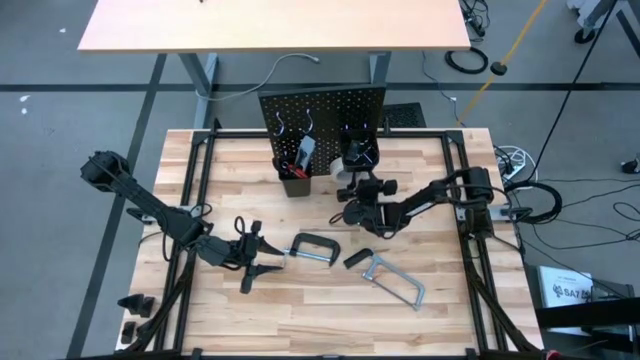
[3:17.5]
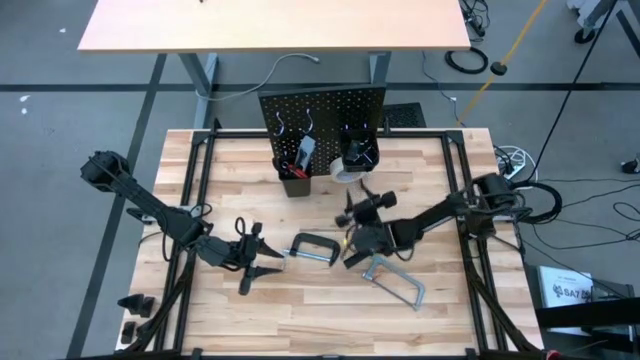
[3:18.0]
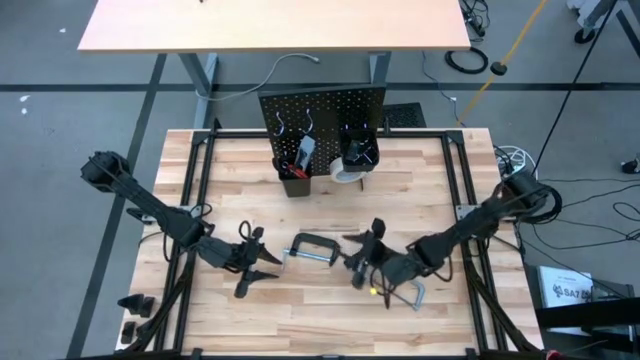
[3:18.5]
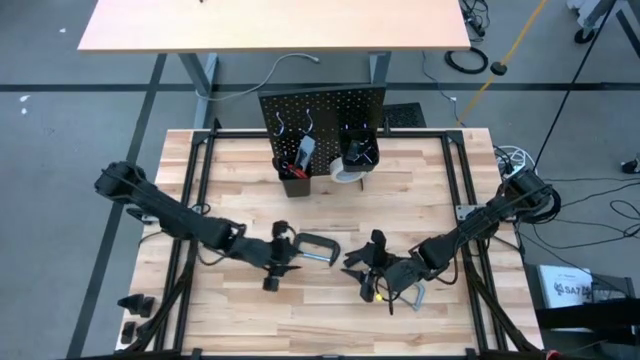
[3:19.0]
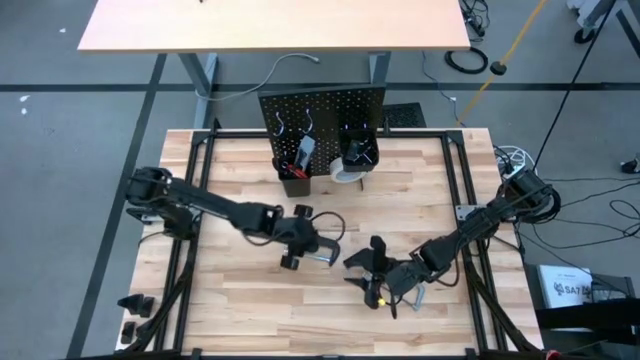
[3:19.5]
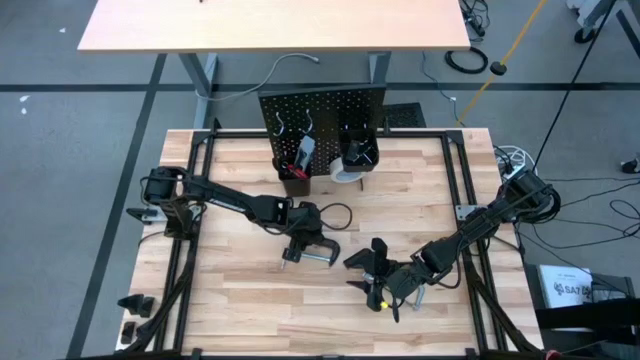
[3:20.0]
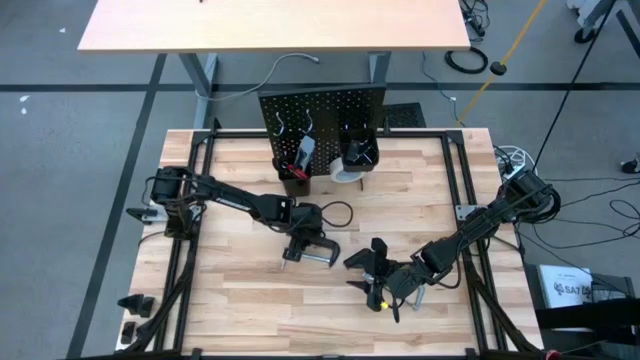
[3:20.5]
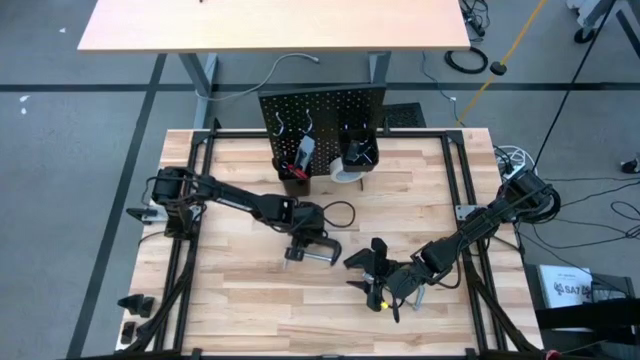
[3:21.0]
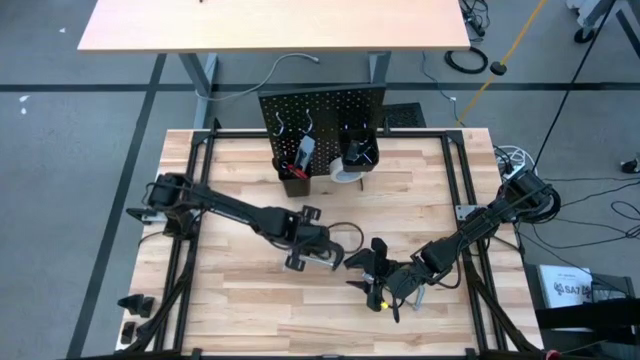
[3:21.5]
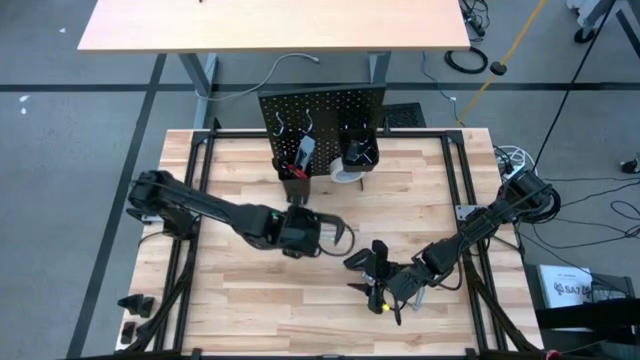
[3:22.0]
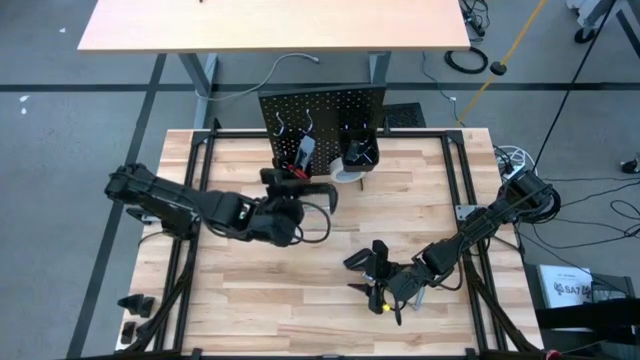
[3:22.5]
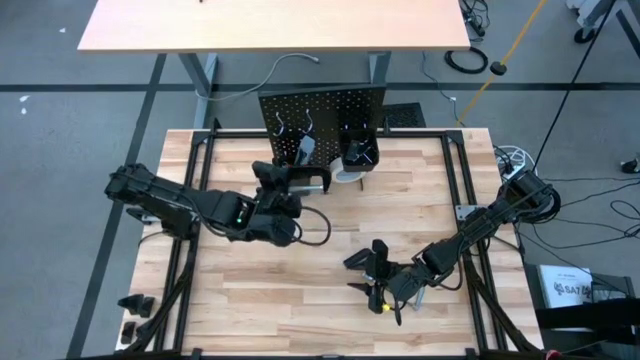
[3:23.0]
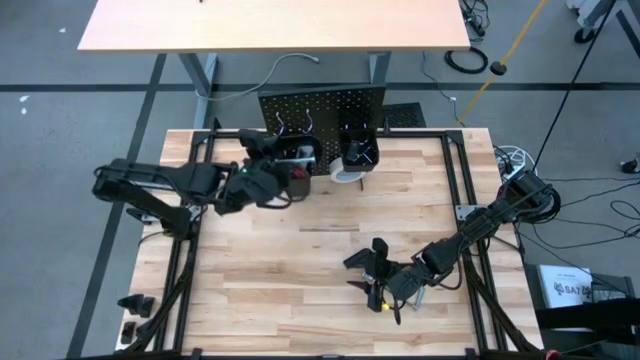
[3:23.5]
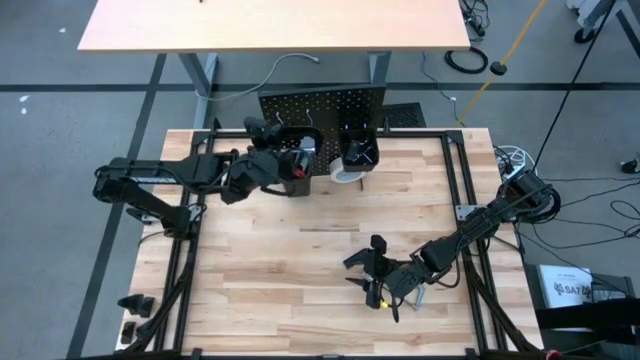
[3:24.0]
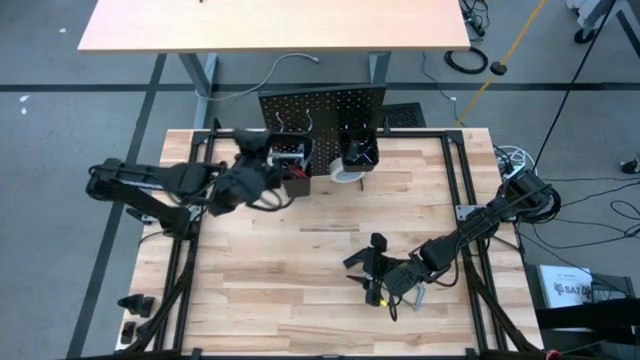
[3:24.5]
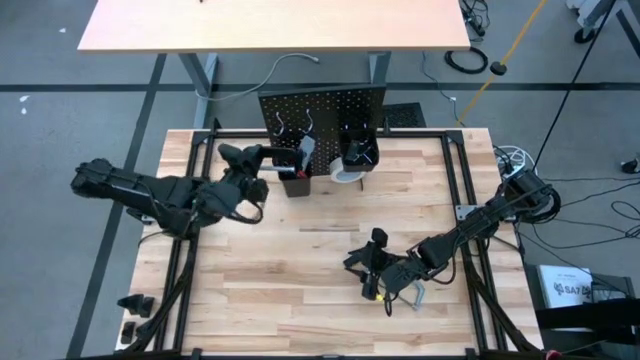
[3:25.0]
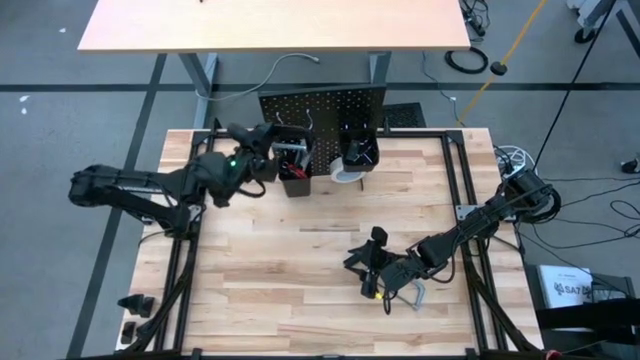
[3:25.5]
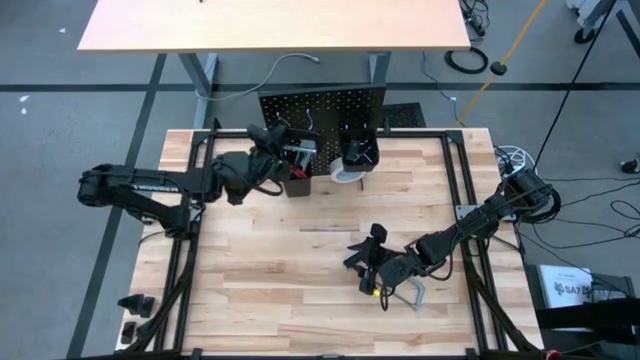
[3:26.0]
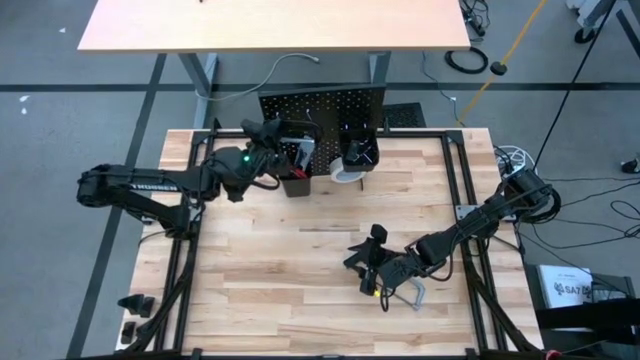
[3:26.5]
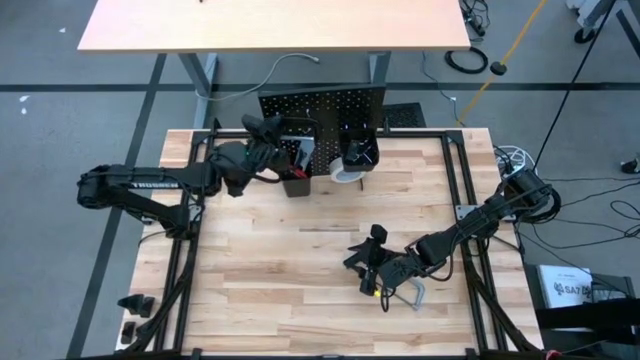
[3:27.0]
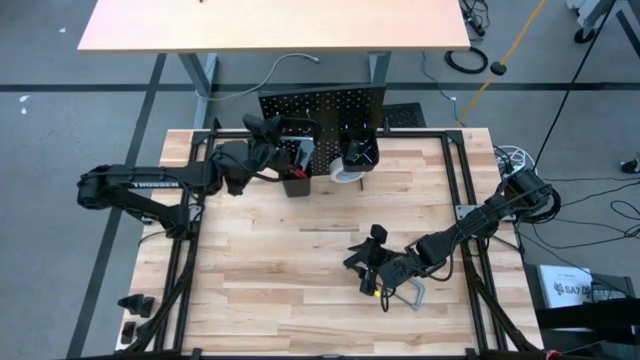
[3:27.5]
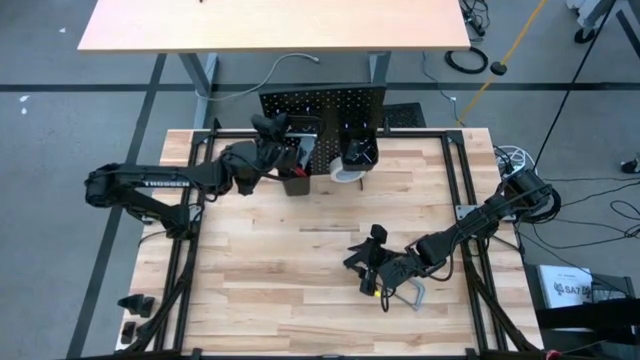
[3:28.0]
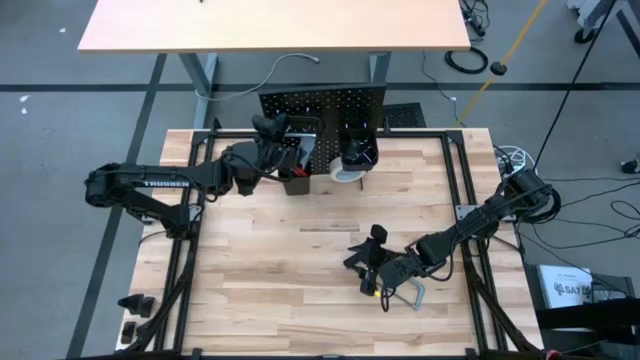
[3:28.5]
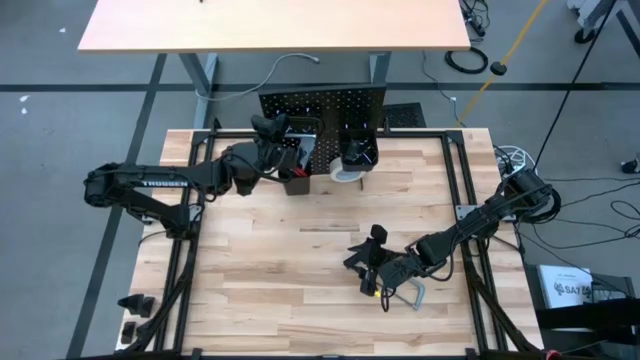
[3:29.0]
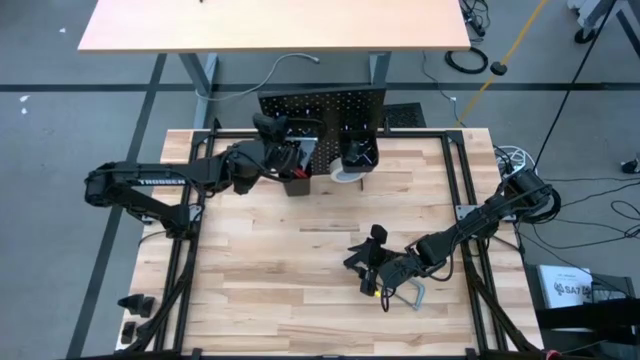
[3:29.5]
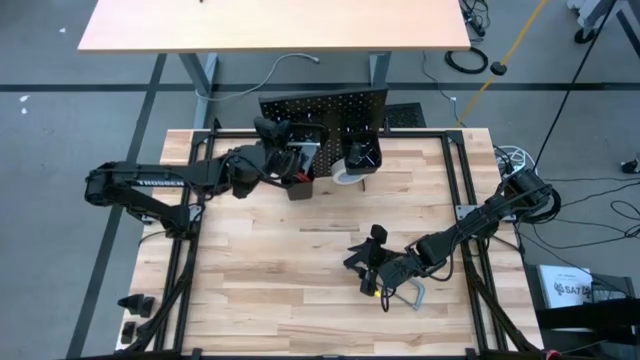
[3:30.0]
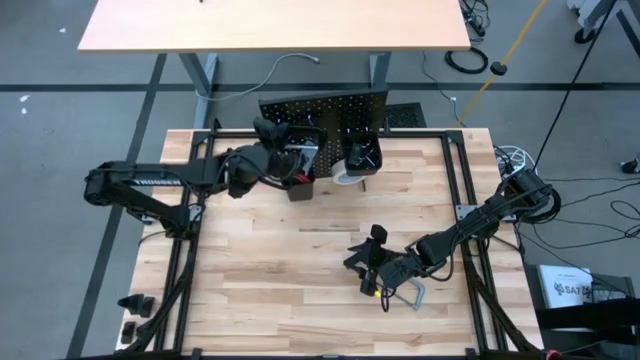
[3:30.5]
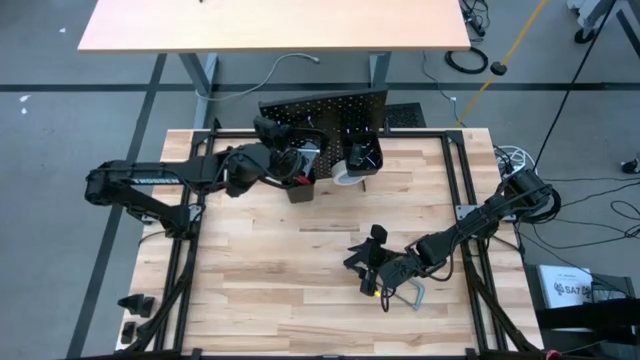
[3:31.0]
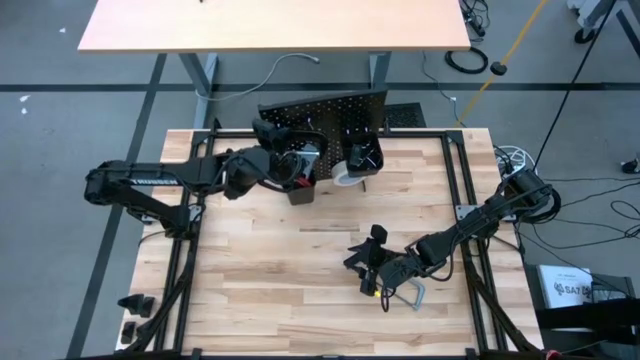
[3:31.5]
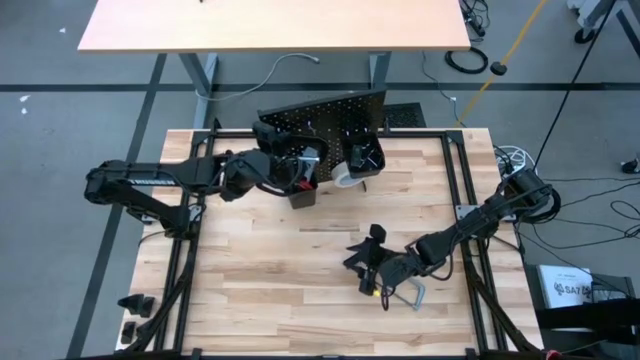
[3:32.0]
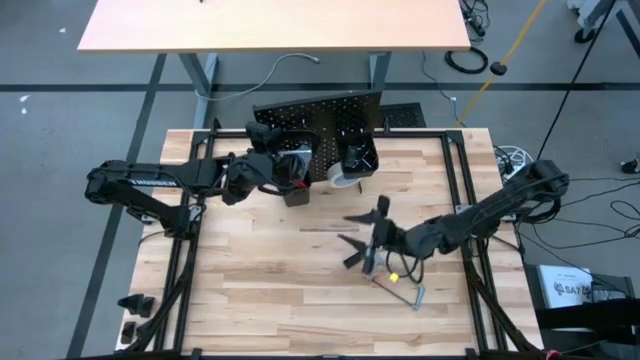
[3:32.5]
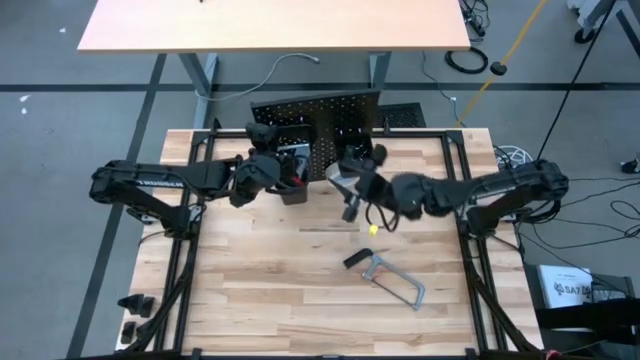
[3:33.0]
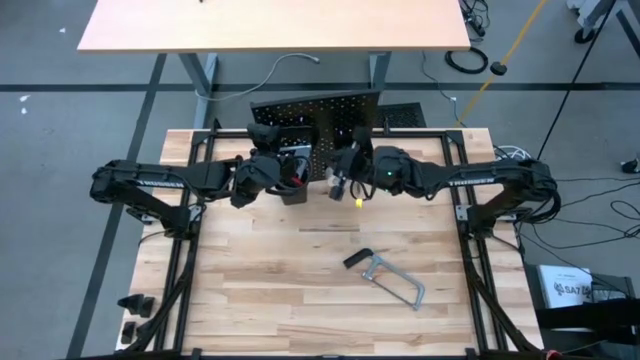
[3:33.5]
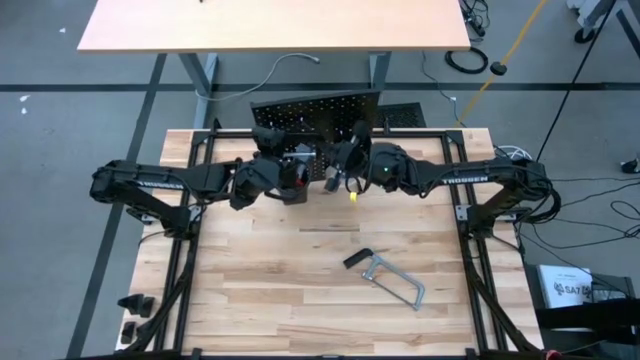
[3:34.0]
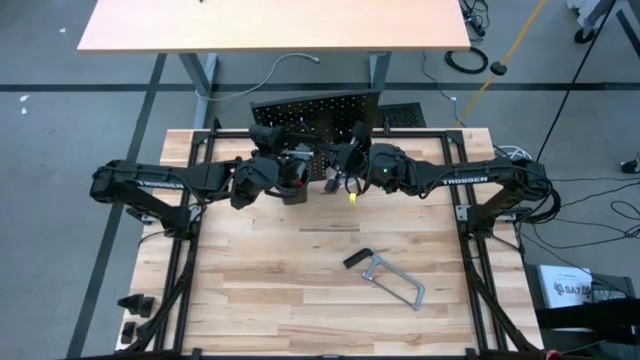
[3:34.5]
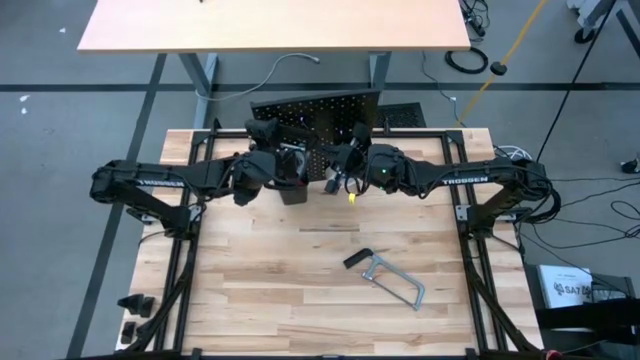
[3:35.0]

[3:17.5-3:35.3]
Task: Hang tools onto peg board
Hang the clamp on the pegboard

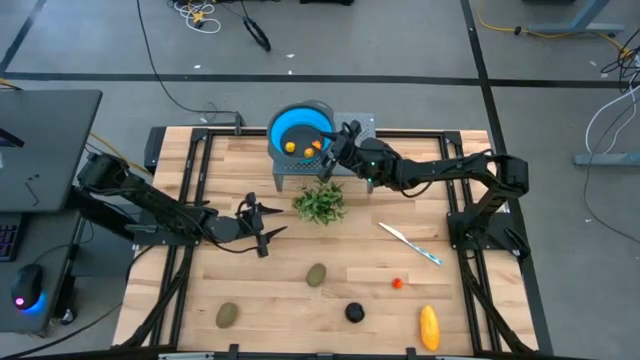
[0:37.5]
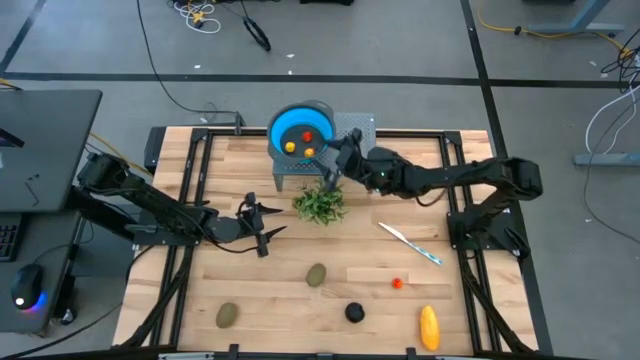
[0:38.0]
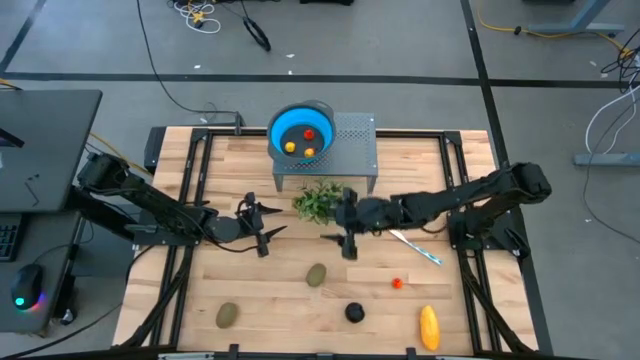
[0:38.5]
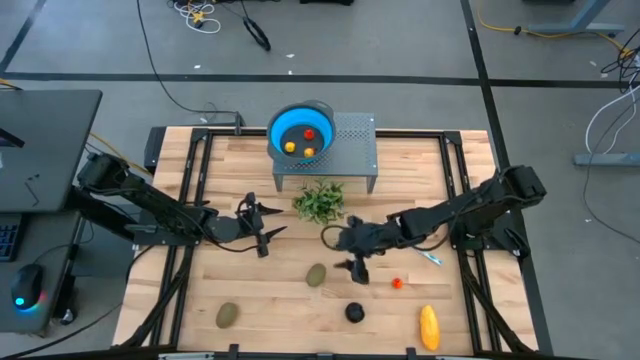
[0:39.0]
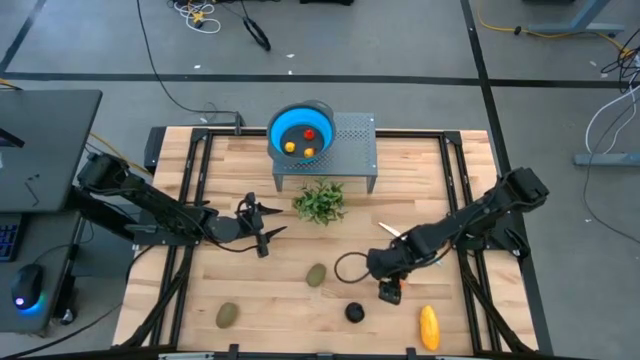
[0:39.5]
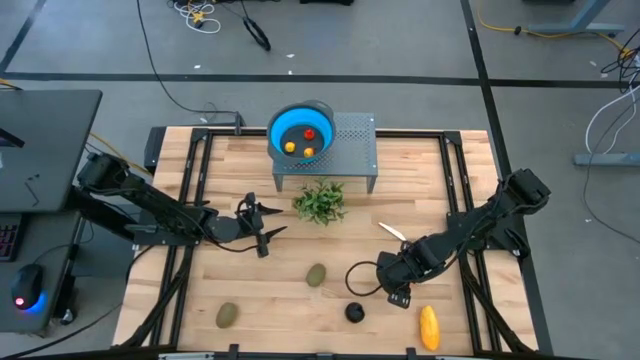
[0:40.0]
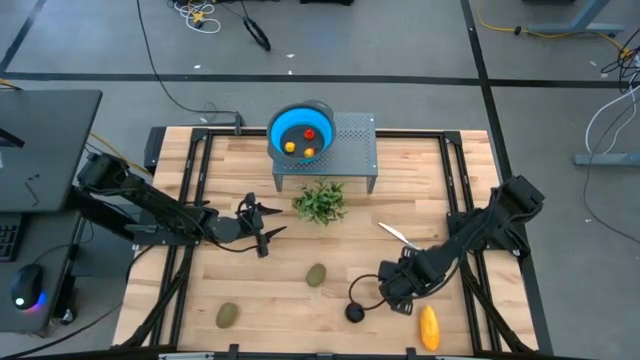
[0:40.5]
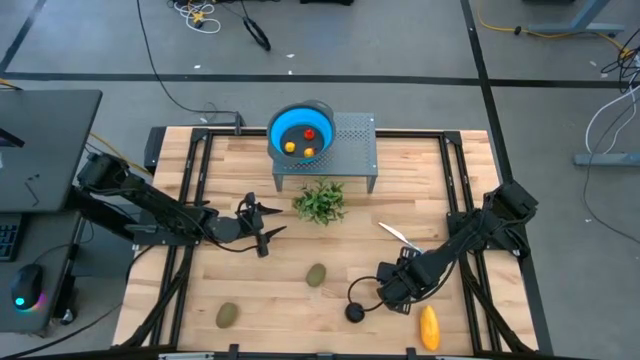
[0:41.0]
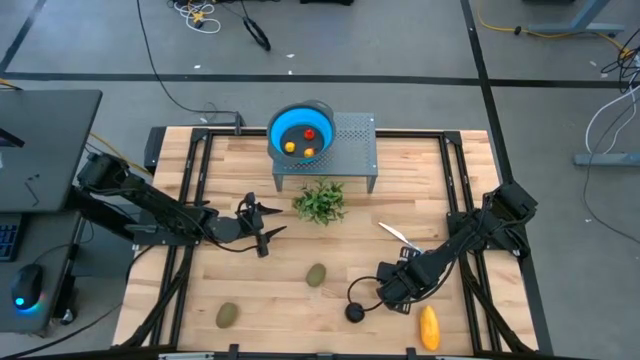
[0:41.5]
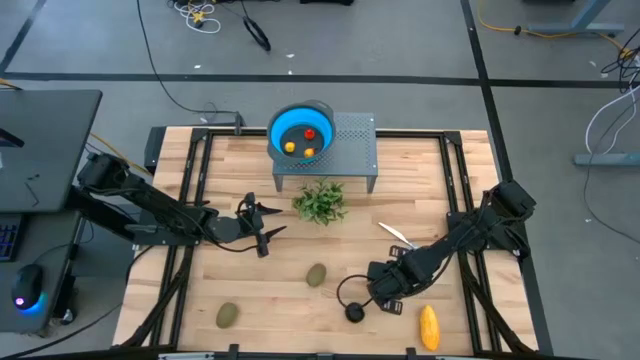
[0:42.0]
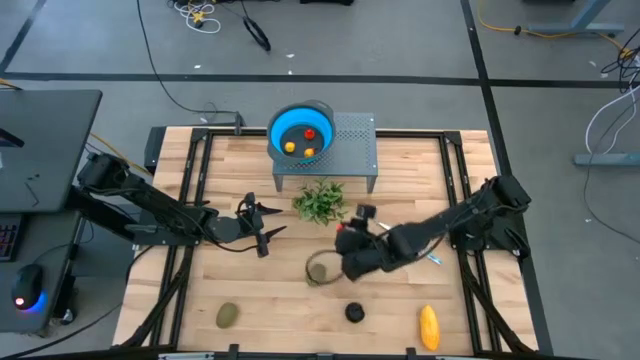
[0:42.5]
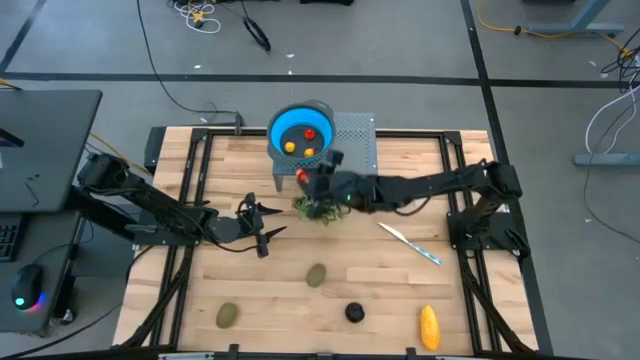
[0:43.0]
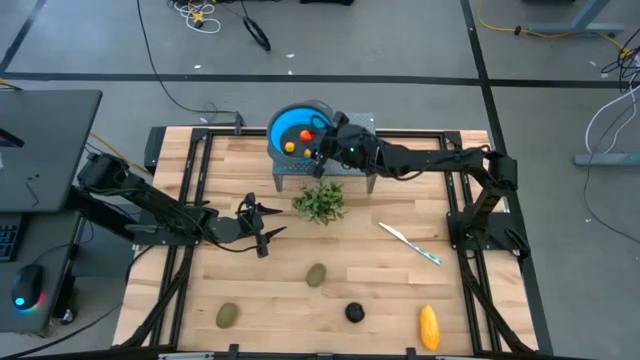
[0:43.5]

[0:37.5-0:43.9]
Task: Pick & Place Fruit
Put the orange pear into the blue strainer bowl on the shelf
